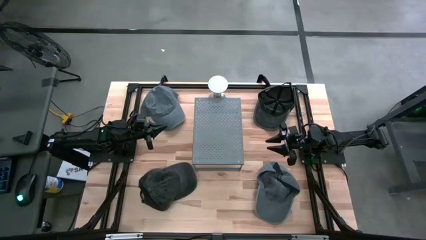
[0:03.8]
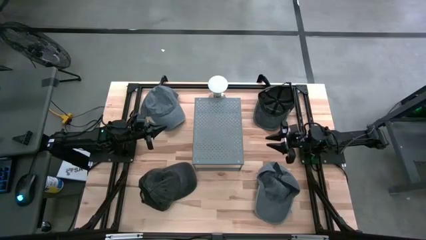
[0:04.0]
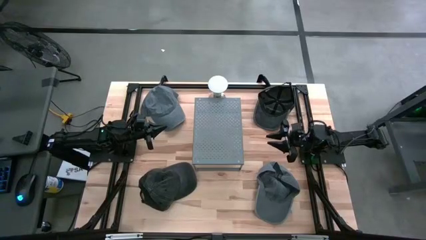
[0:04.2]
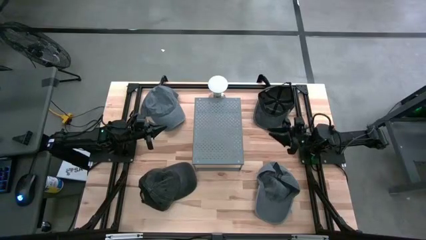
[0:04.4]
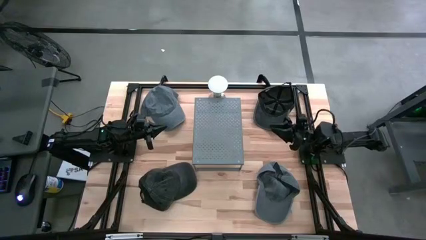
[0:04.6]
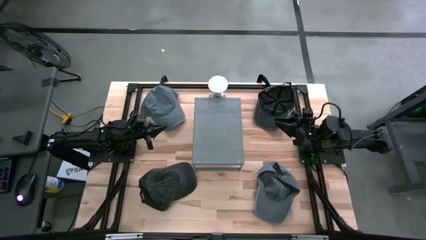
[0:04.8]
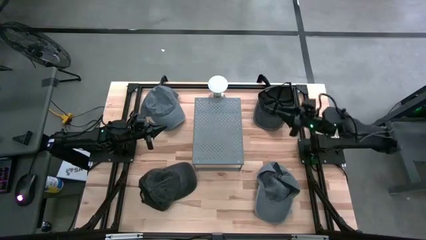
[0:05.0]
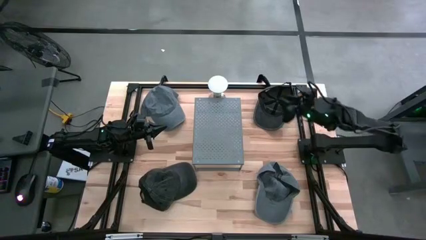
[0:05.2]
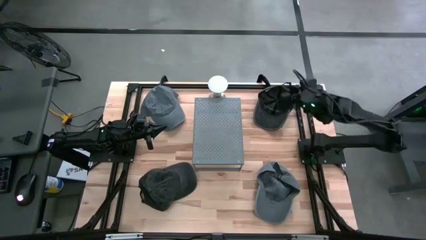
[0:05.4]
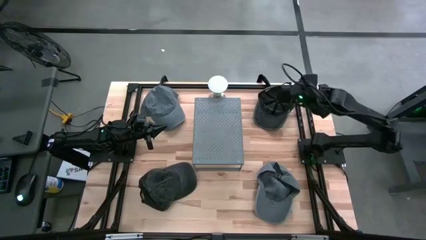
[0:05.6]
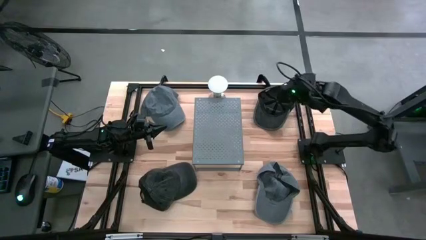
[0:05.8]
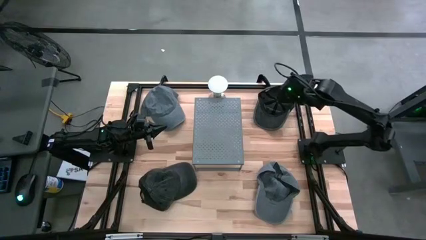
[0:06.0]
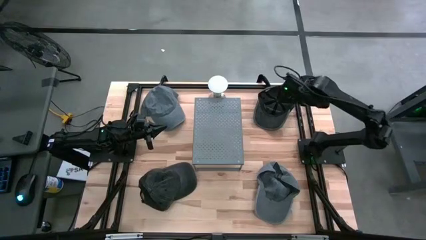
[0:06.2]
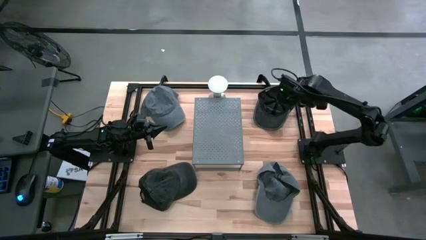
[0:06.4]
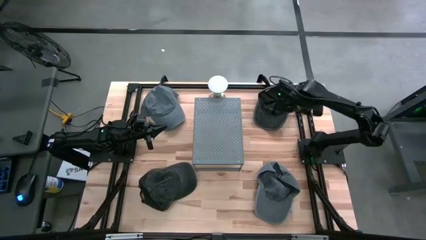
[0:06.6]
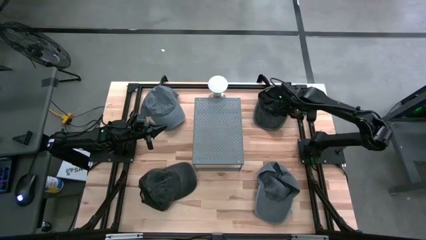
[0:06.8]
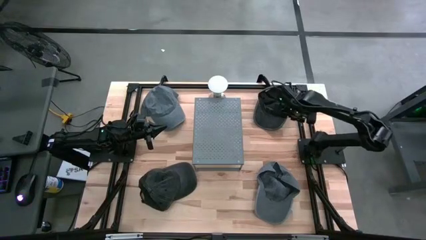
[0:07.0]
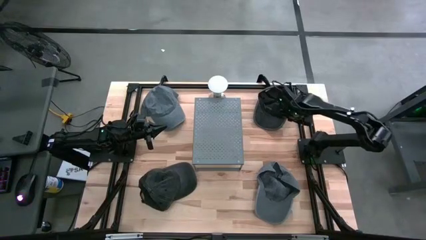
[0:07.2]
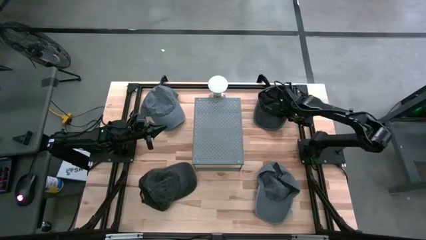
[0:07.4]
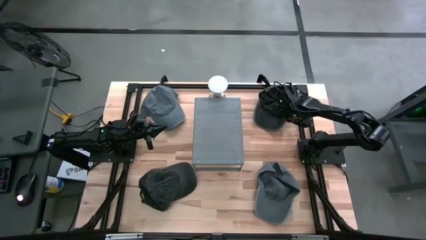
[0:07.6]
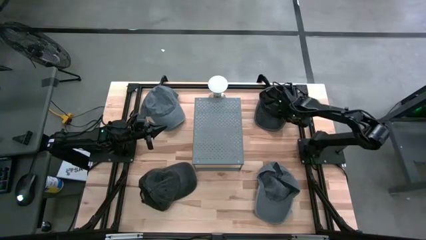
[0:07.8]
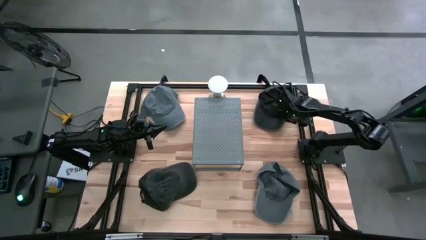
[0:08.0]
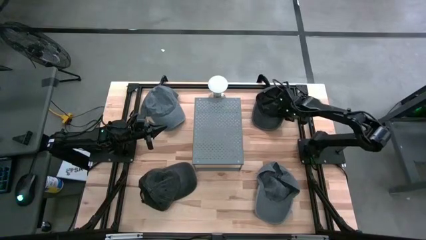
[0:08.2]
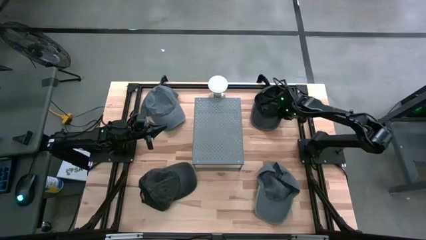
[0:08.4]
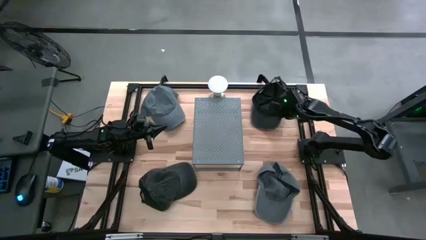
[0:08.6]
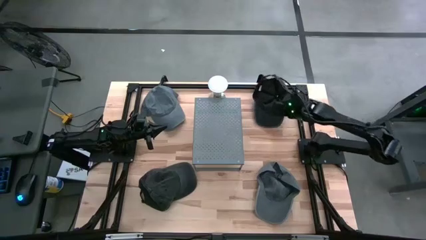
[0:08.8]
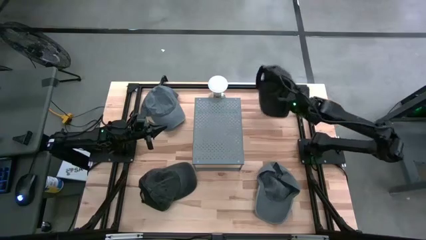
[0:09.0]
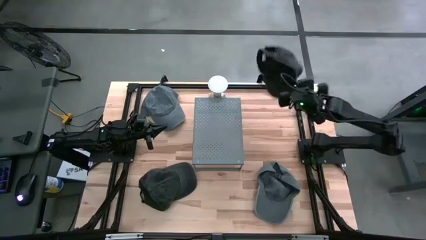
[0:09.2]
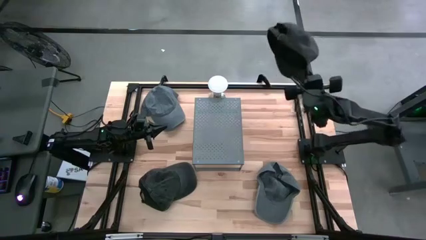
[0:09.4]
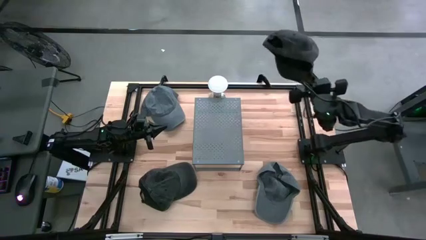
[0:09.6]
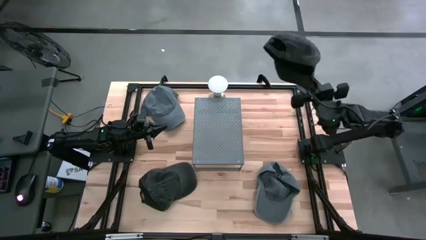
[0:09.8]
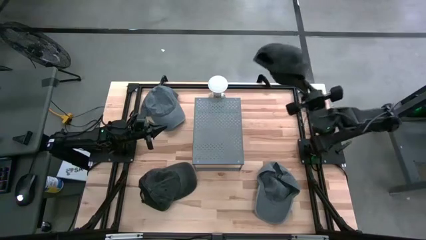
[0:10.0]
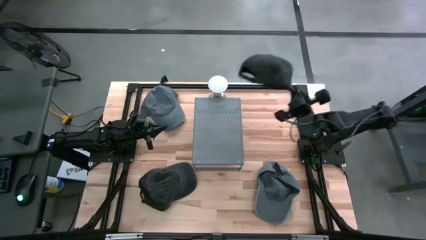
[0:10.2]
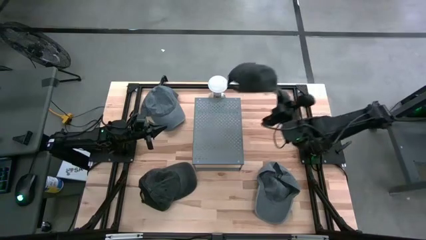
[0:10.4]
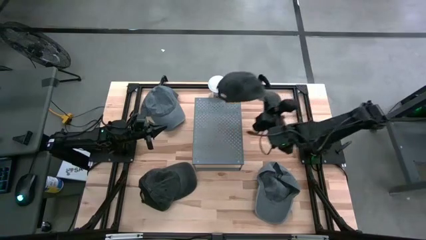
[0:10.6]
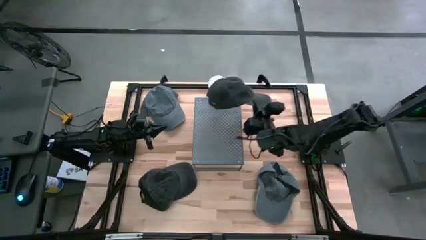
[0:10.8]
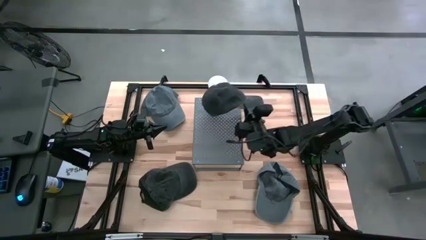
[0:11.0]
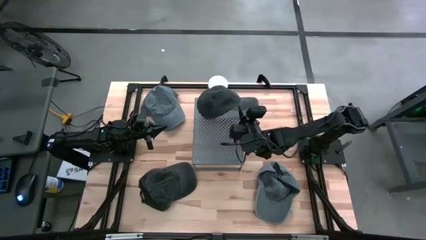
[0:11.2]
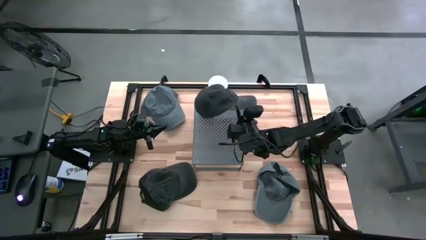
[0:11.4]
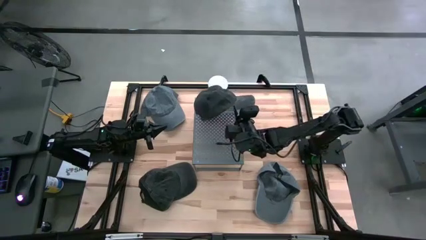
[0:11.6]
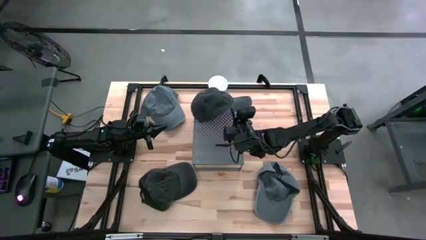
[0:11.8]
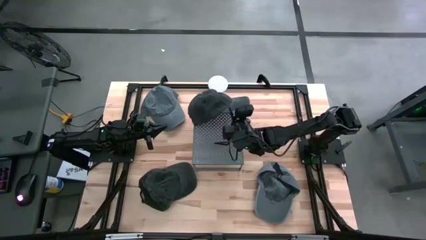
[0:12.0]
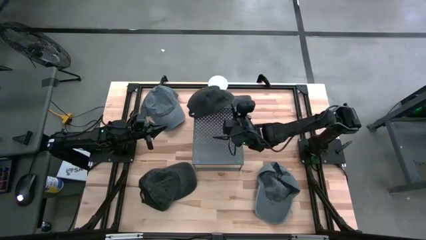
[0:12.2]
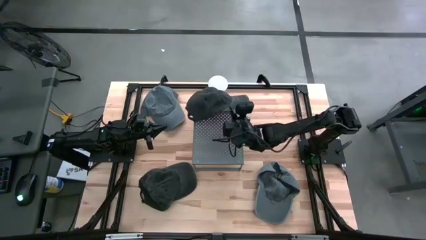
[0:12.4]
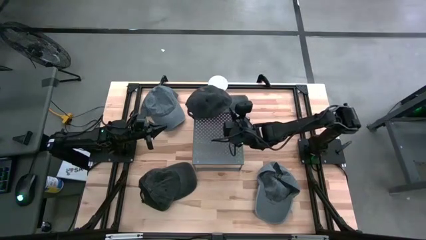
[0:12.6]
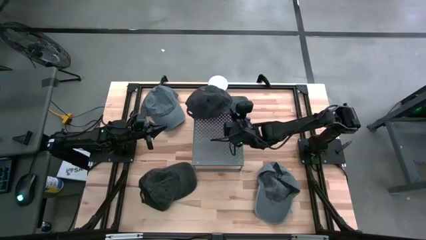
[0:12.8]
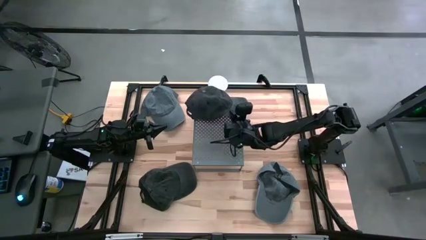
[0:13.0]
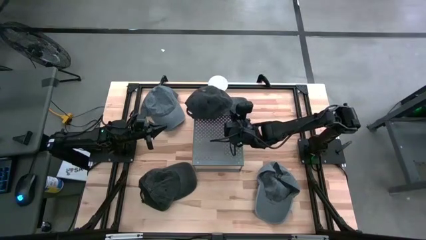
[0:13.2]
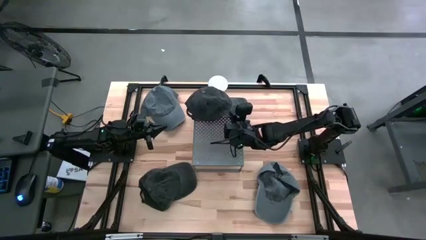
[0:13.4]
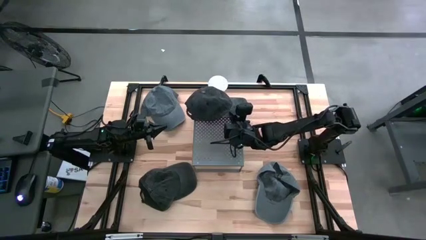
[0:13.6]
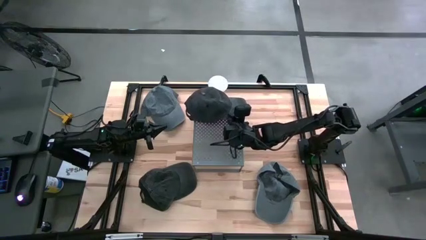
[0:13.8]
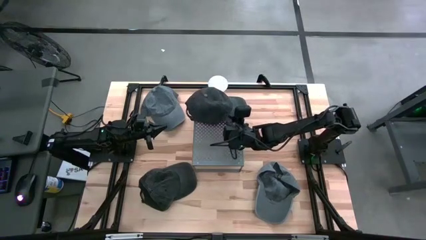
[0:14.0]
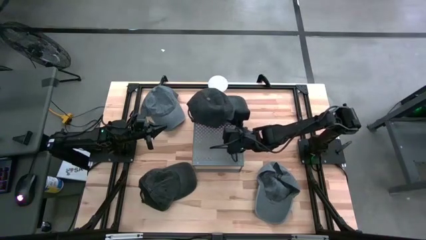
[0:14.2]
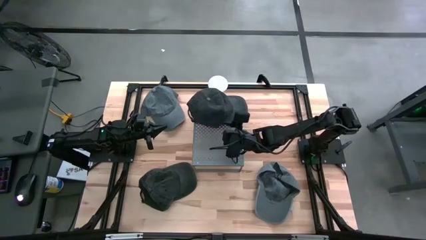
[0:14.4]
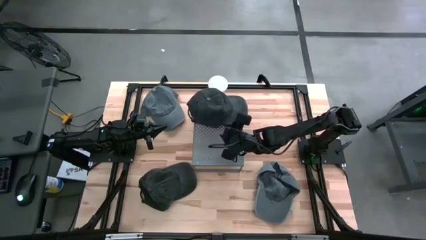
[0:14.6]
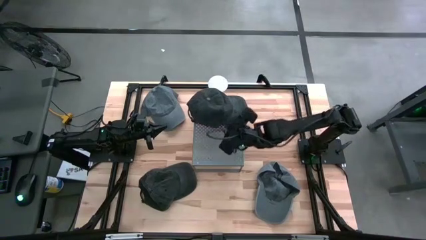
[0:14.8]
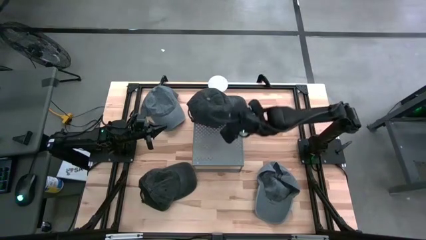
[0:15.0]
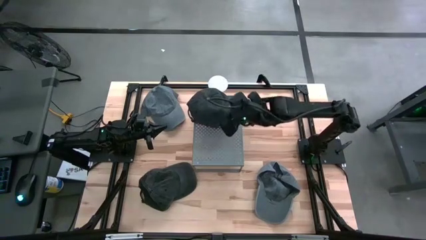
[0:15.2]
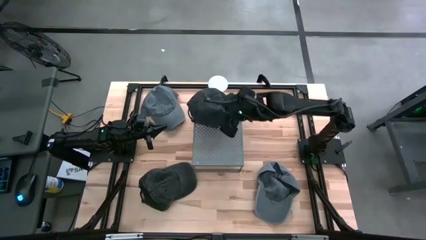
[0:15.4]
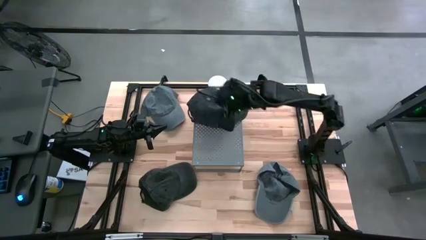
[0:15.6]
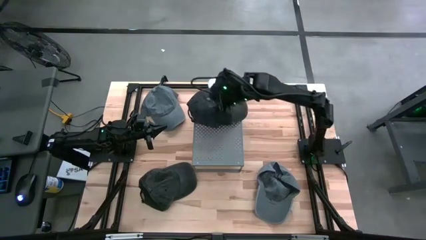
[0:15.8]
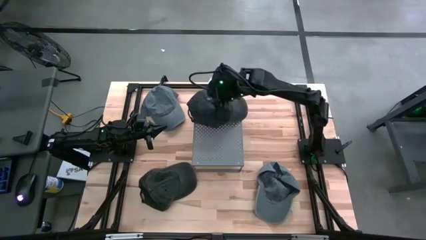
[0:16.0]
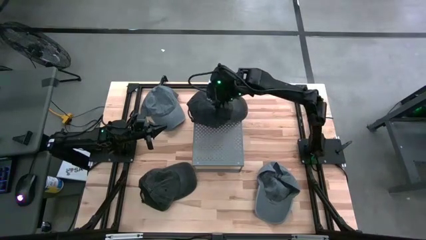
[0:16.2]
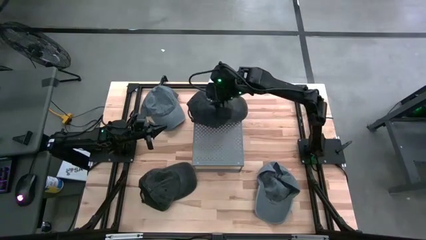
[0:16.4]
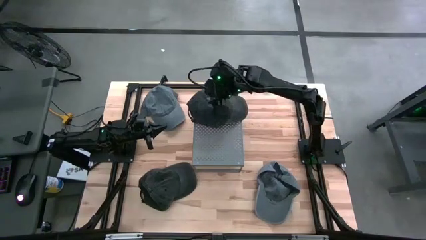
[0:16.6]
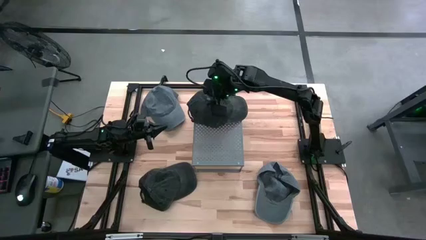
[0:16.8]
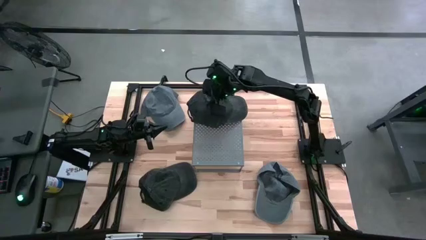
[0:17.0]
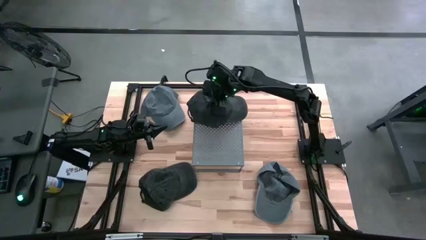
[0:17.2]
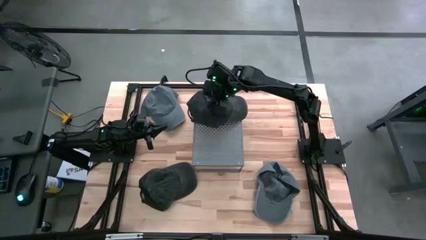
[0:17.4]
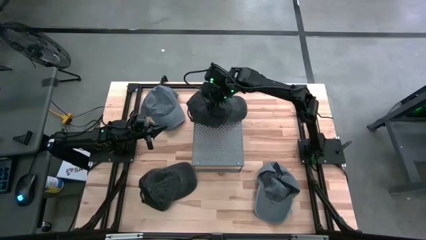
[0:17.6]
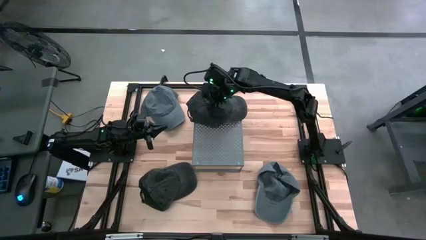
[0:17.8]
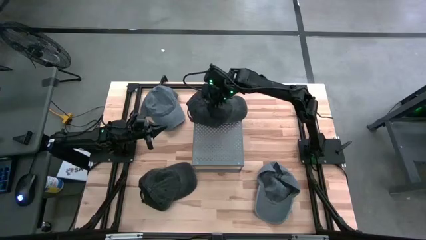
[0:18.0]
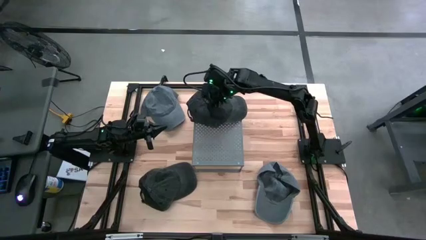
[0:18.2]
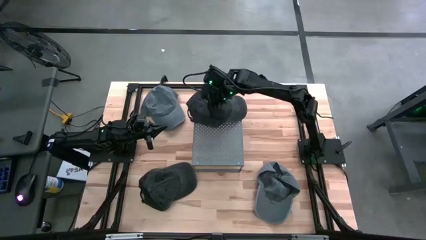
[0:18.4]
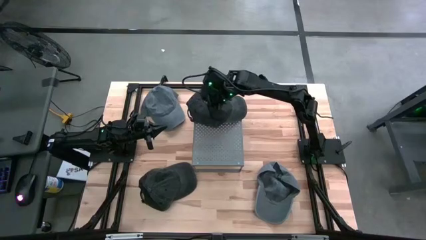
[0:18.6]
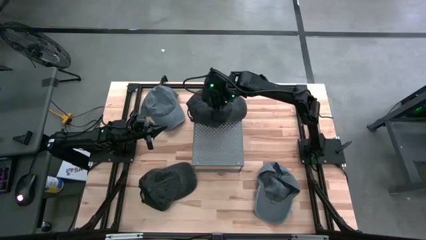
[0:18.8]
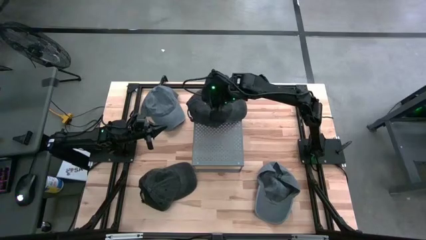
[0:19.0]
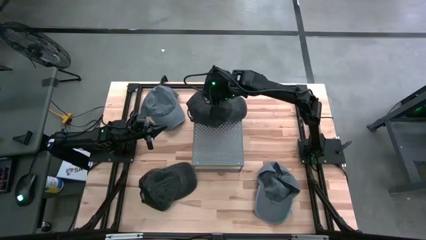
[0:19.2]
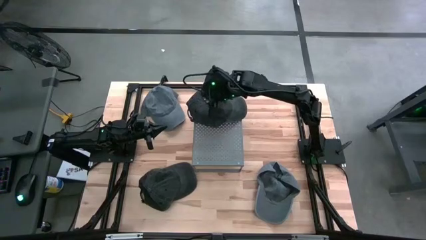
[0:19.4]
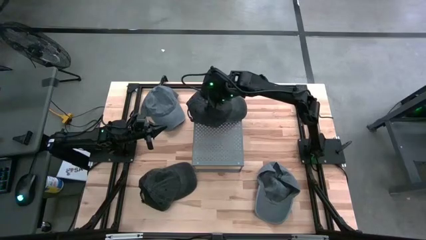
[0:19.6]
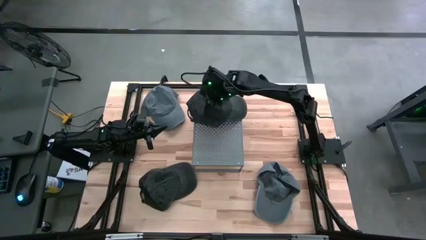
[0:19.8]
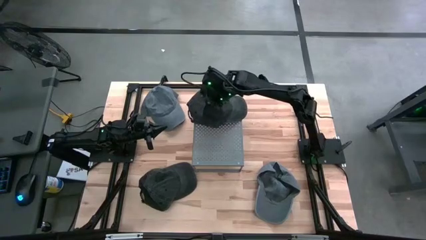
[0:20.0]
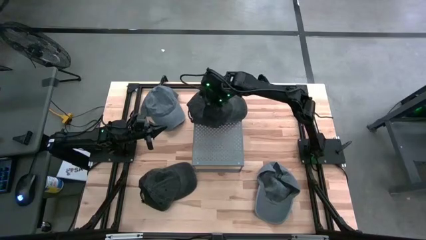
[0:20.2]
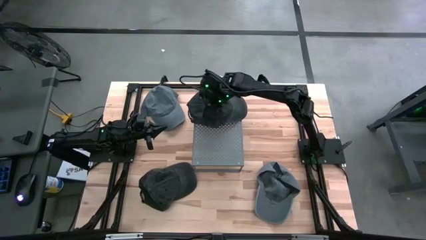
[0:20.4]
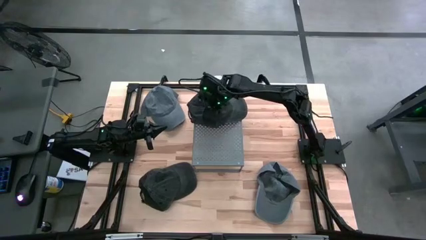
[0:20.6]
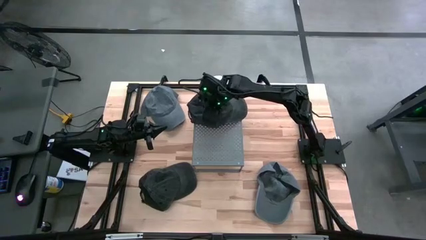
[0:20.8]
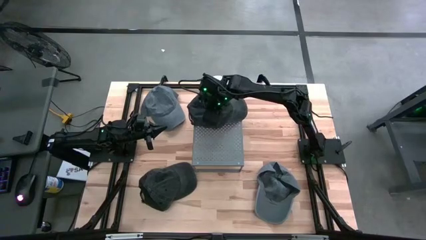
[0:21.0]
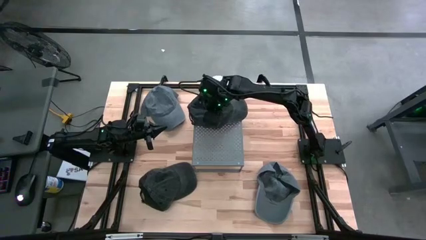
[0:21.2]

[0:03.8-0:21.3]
Task: Pick & Place hat
Put the top black cap on the shelf
